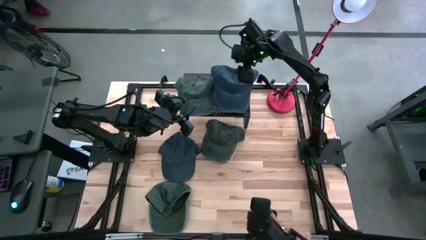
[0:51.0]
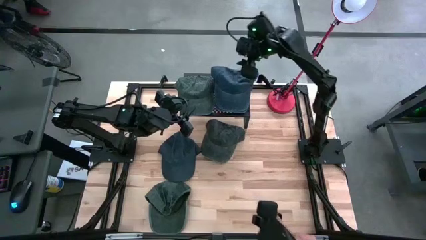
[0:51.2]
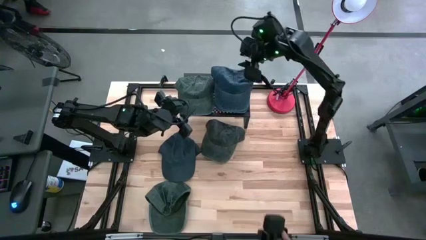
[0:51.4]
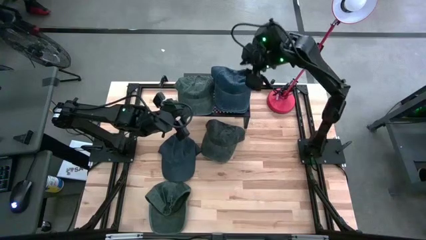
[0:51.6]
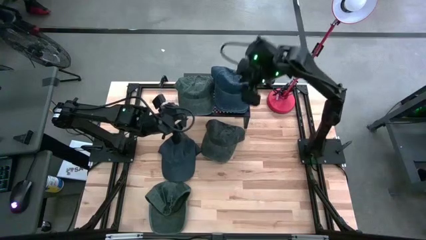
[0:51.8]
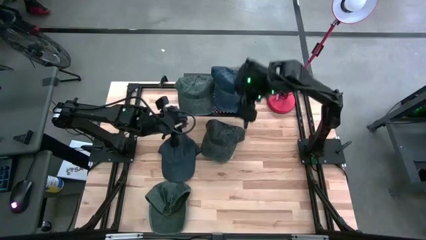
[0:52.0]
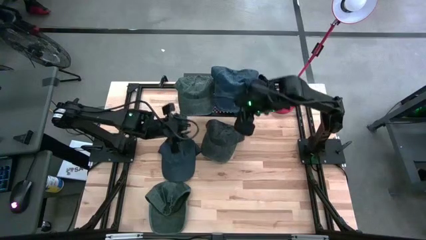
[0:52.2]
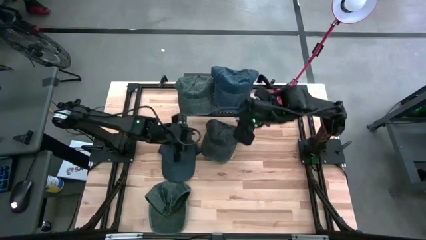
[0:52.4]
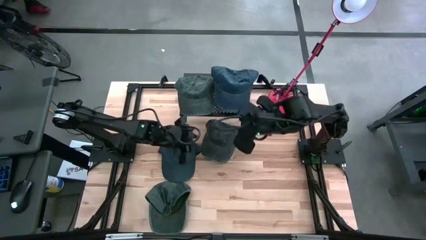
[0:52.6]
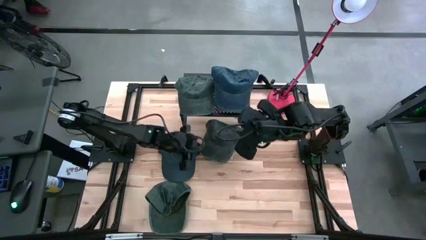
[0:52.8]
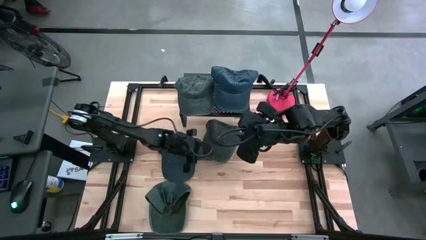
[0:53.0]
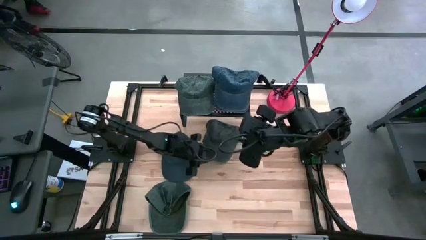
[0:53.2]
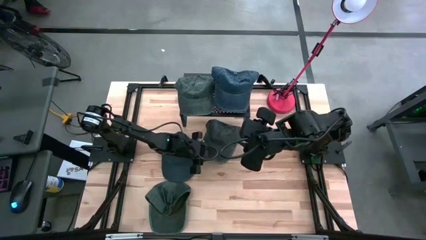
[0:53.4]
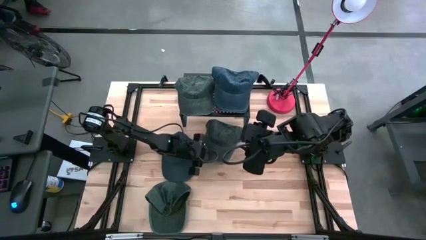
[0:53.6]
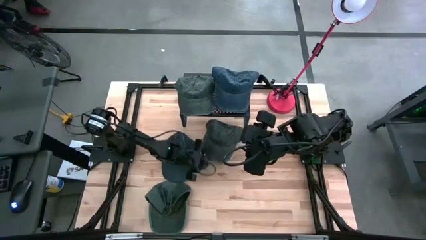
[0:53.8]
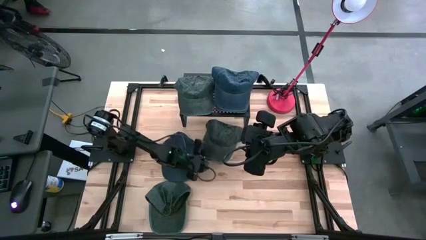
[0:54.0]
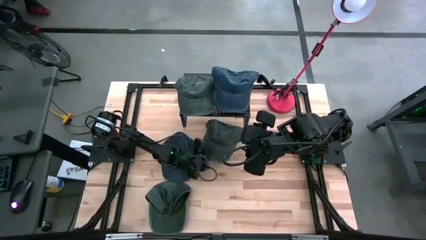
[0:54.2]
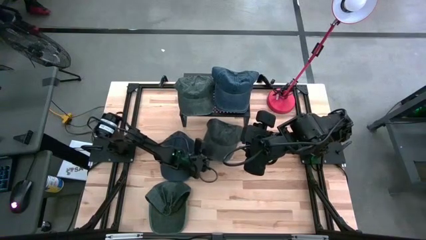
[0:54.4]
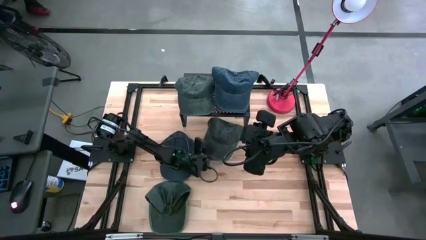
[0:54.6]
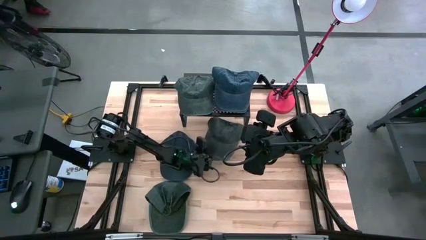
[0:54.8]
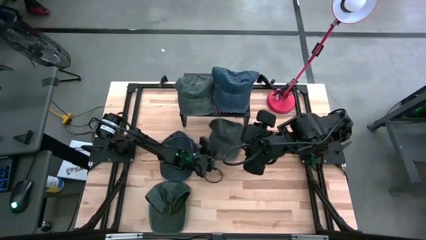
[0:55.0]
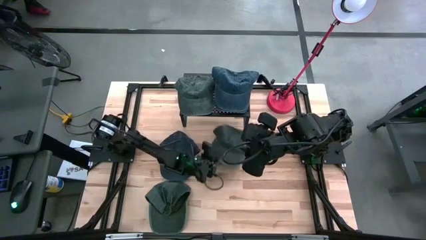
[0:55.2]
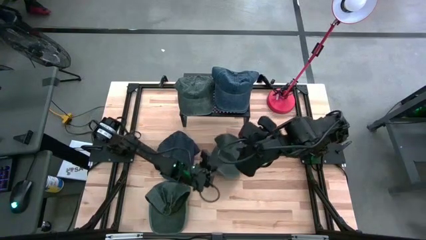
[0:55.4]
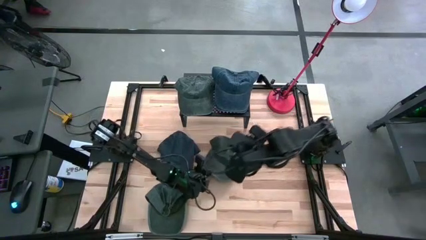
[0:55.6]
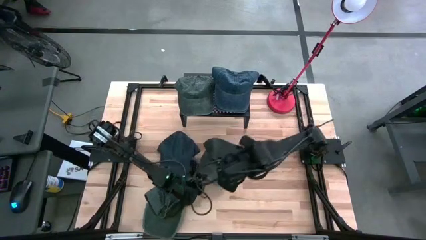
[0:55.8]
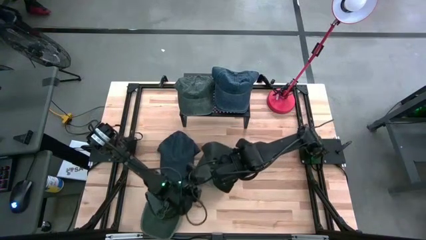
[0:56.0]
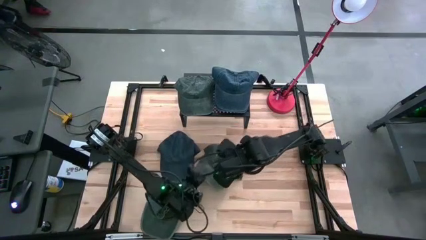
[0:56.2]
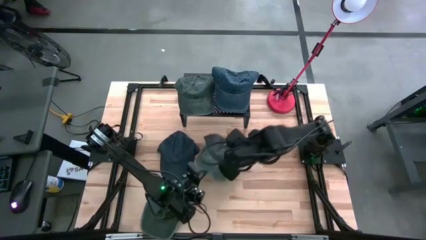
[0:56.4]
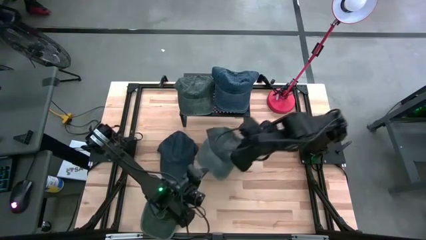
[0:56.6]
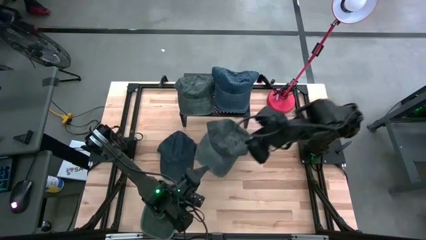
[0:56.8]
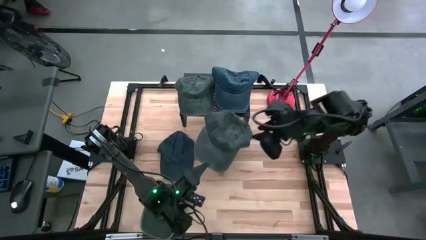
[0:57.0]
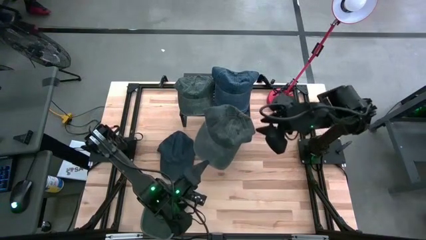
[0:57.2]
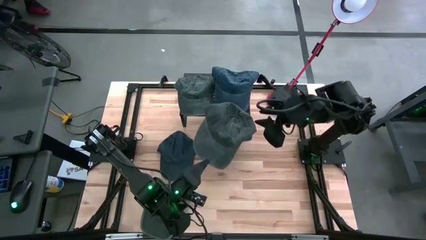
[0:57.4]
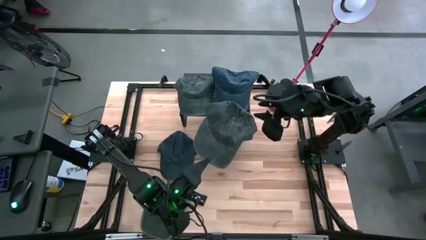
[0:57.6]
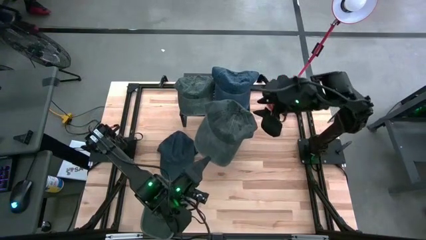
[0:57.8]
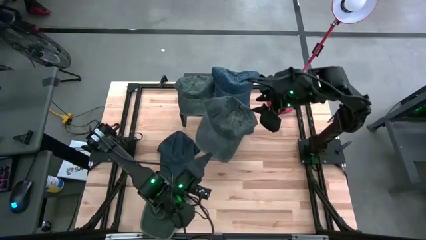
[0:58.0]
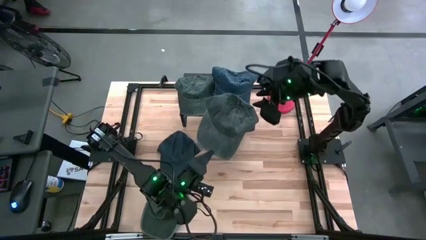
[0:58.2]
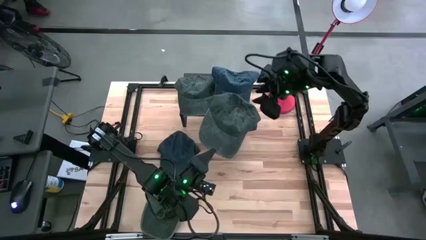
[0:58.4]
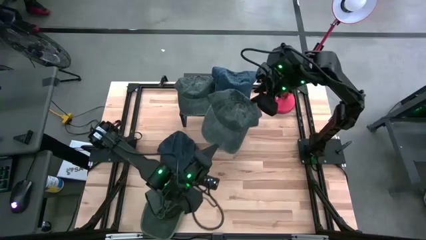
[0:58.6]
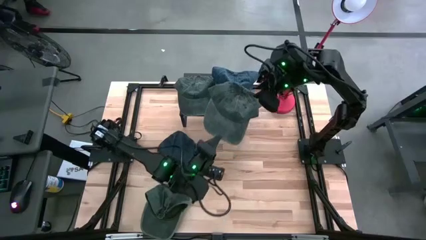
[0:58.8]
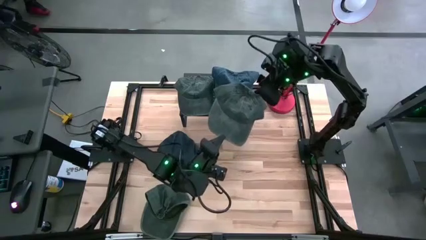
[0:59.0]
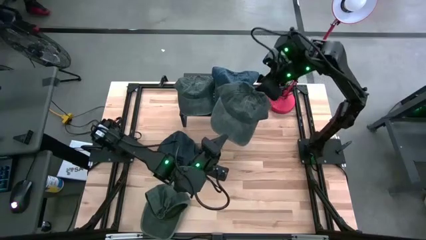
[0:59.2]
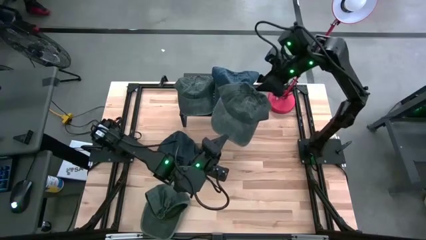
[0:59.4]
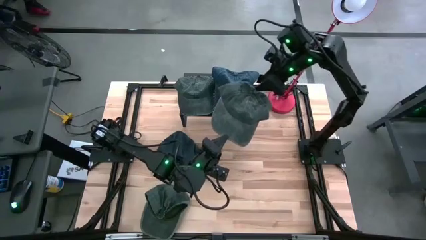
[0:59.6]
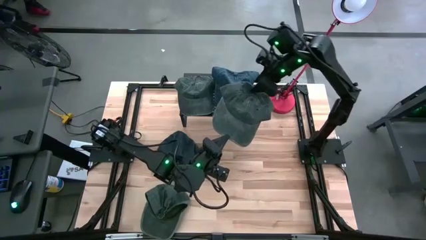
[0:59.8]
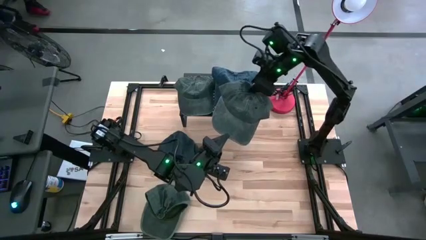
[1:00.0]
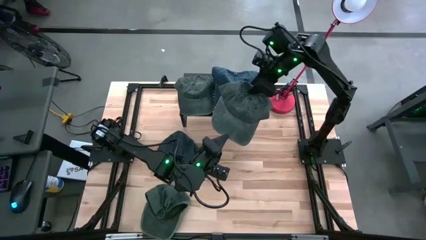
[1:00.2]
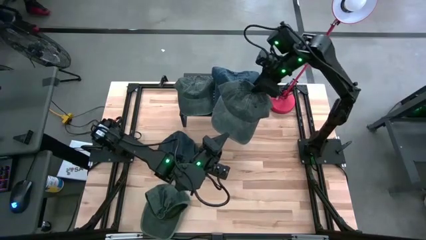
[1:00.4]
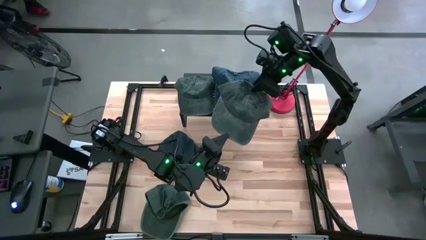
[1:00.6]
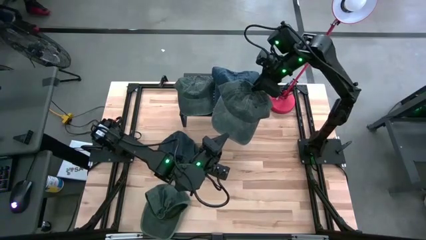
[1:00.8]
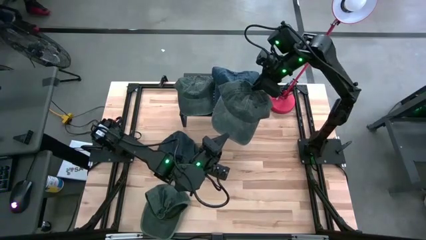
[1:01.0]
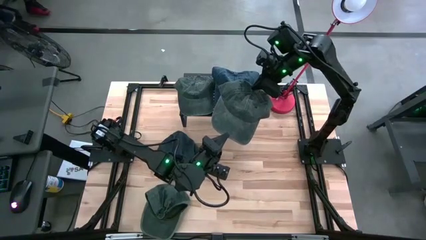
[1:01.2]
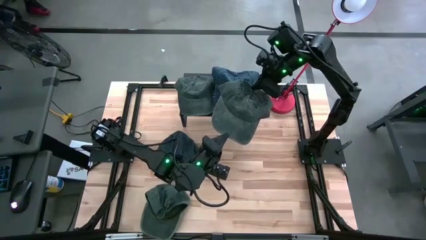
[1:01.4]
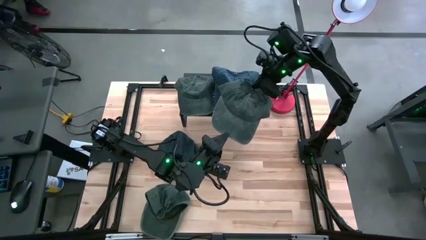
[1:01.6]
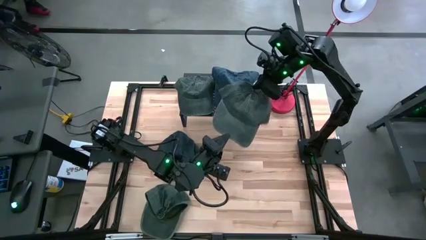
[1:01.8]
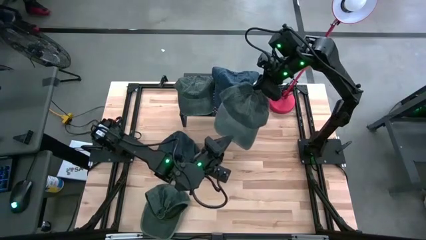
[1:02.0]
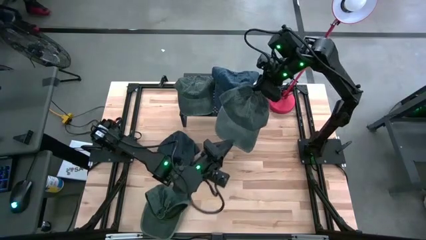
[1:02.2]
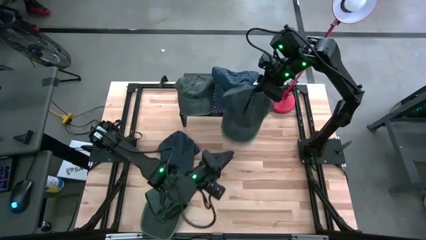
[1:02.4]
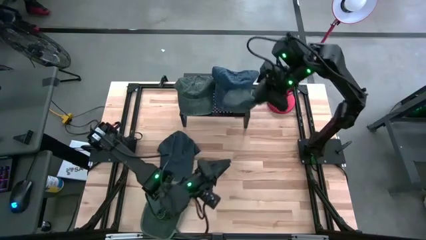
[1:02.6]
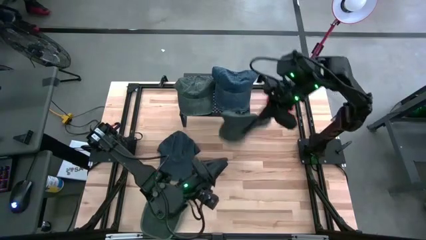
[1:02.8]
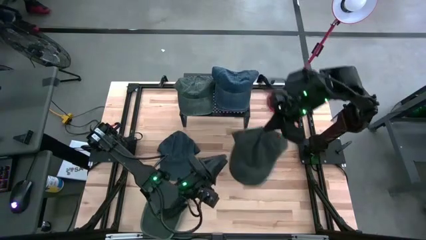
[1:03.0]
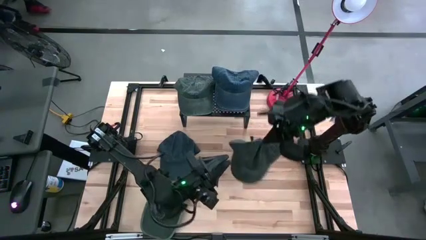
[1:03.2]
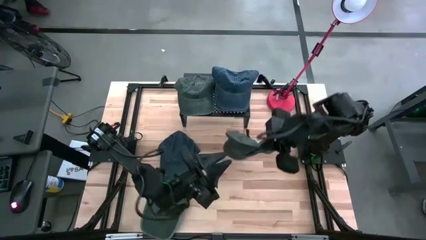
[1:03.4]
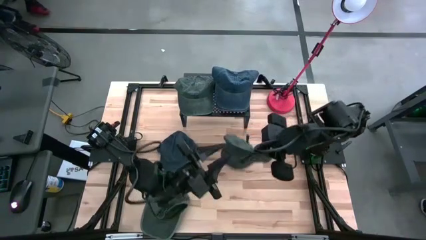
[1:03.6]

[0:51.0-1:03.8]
Task: Pick & Place hat
Stack the top dark green cap on top of the other dark green cap on the shelf
